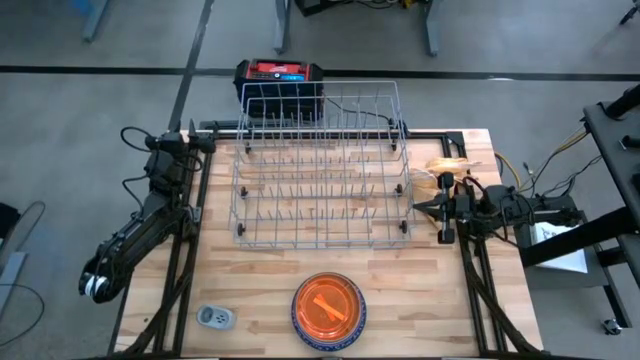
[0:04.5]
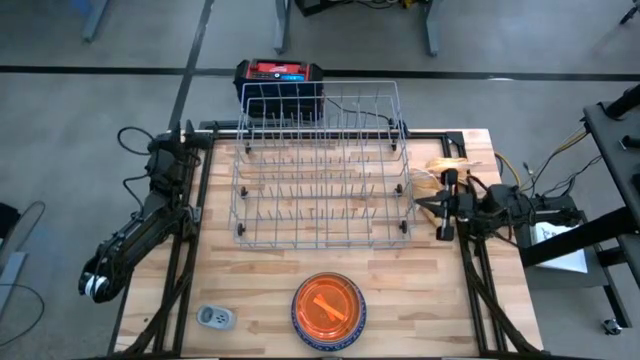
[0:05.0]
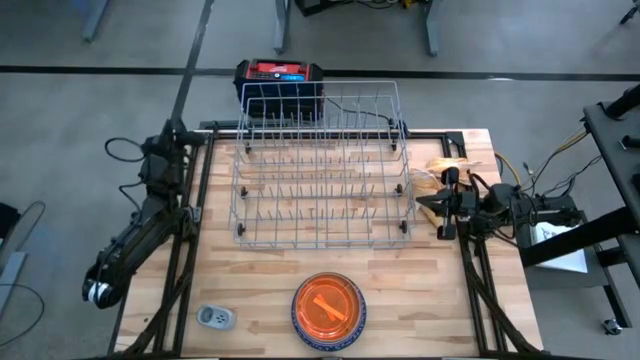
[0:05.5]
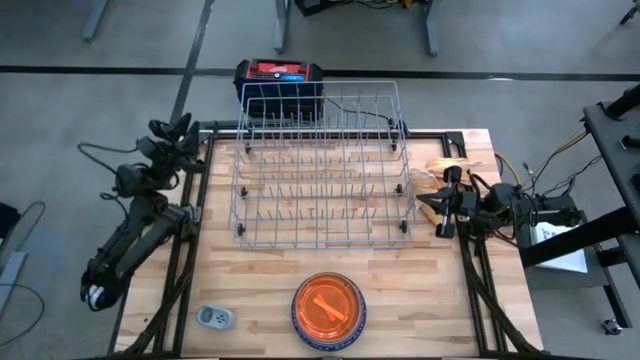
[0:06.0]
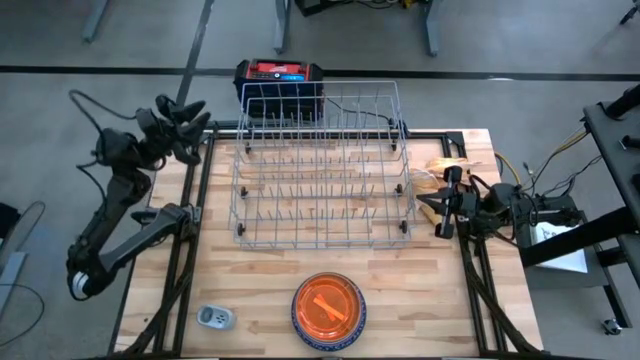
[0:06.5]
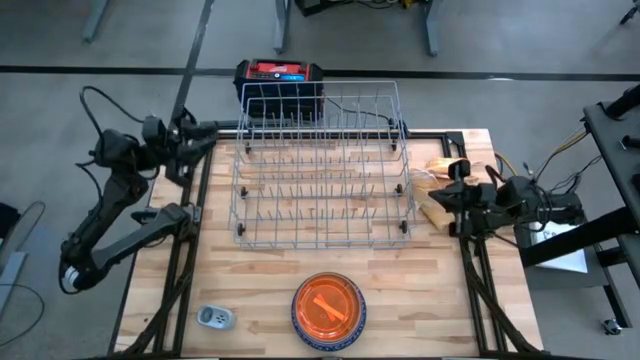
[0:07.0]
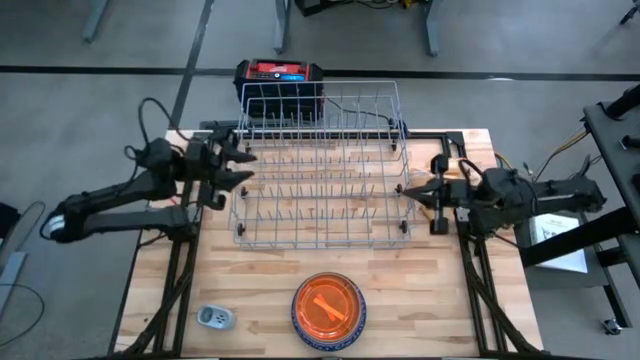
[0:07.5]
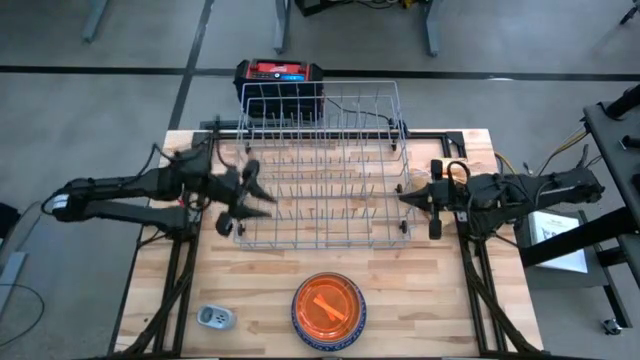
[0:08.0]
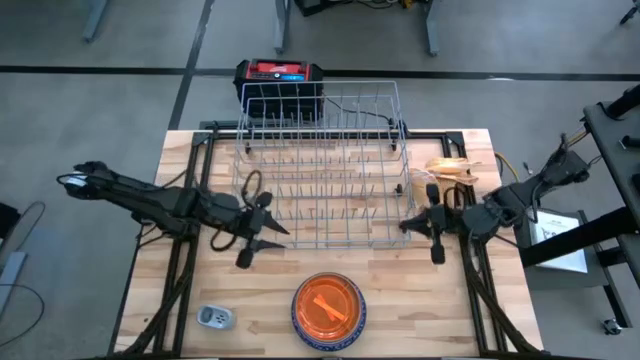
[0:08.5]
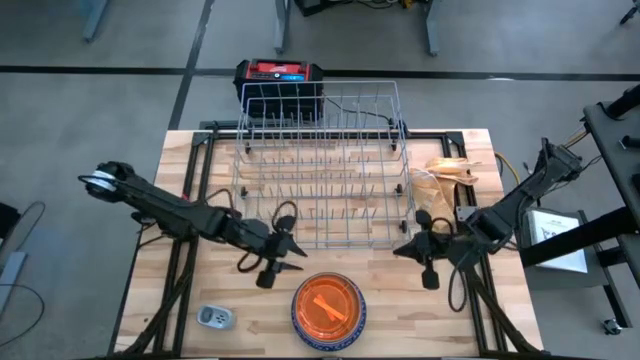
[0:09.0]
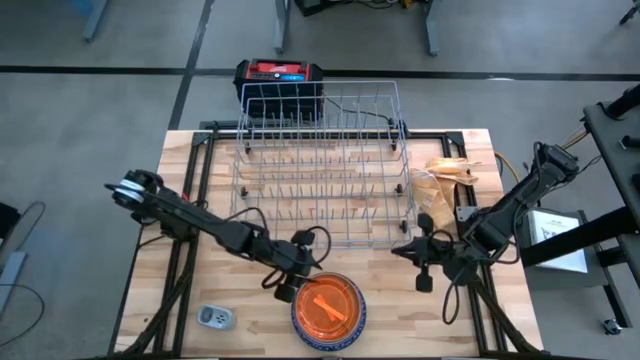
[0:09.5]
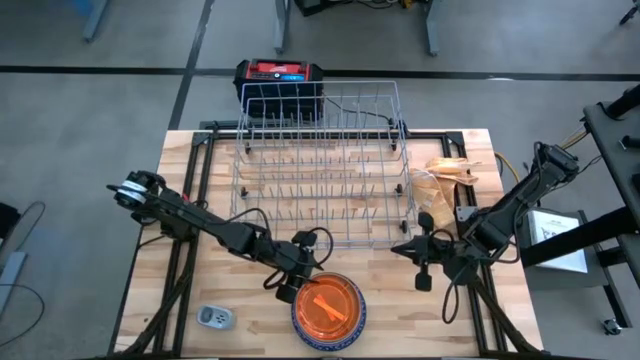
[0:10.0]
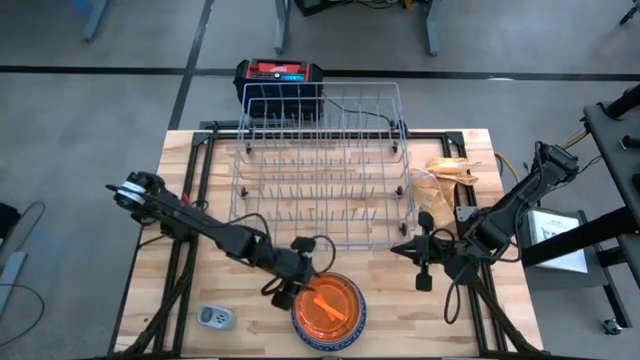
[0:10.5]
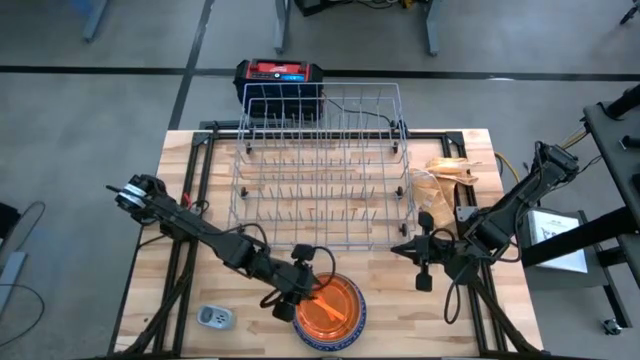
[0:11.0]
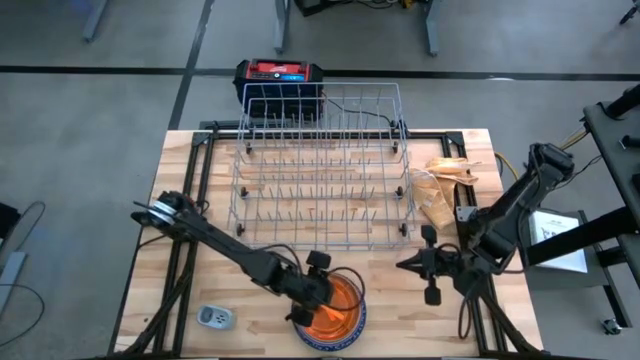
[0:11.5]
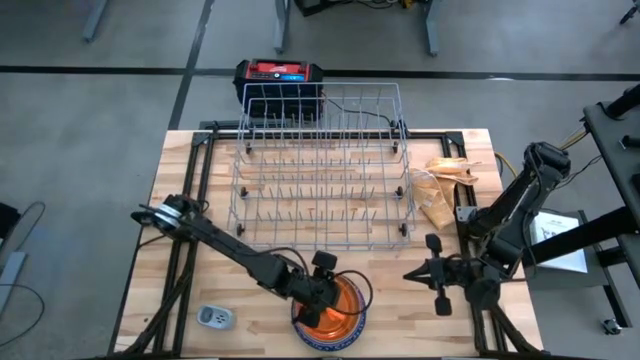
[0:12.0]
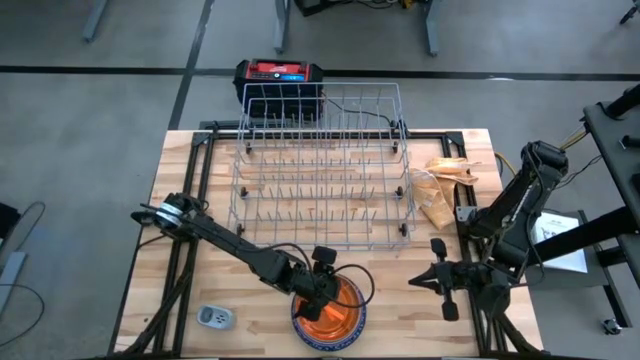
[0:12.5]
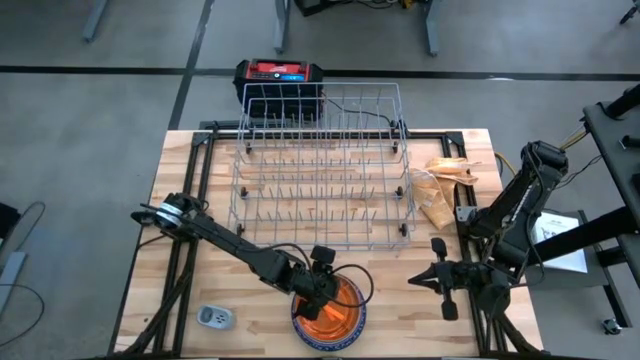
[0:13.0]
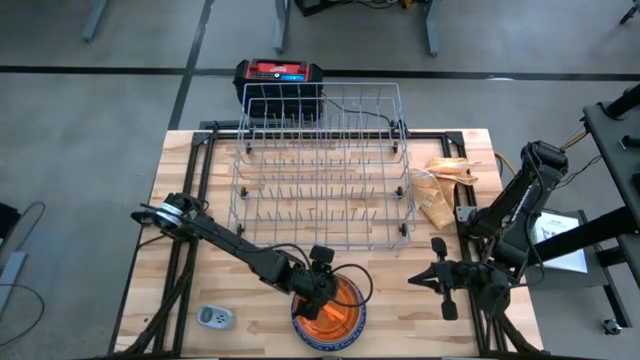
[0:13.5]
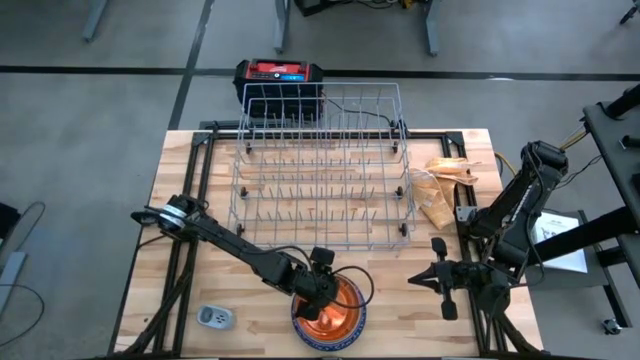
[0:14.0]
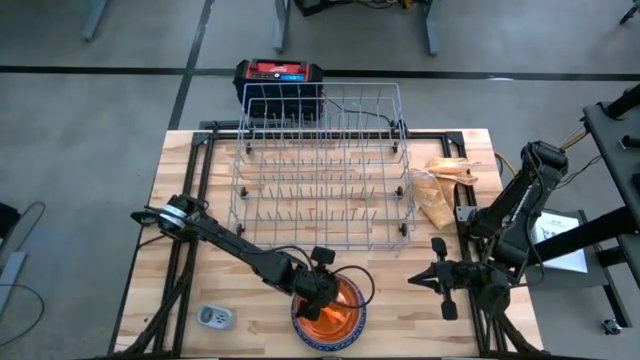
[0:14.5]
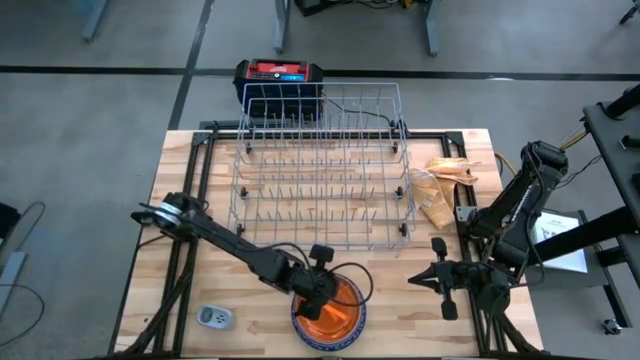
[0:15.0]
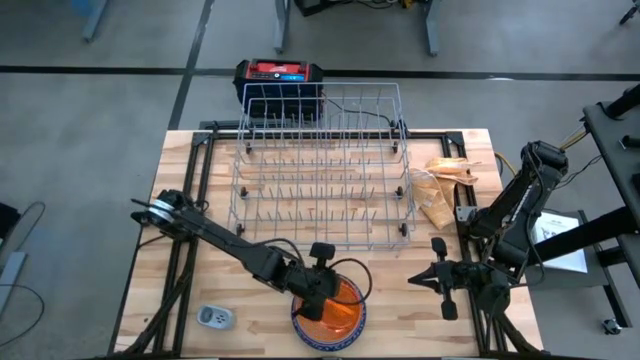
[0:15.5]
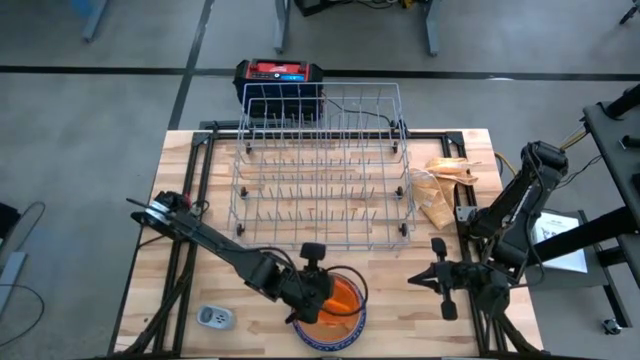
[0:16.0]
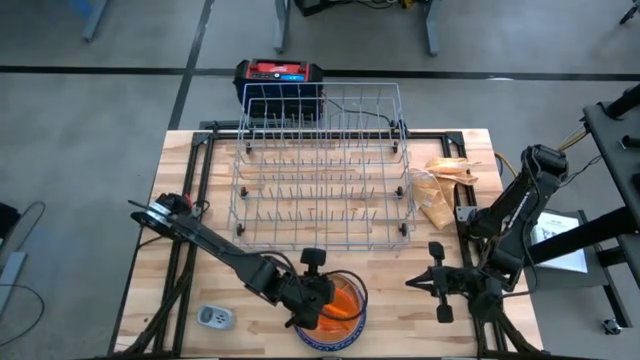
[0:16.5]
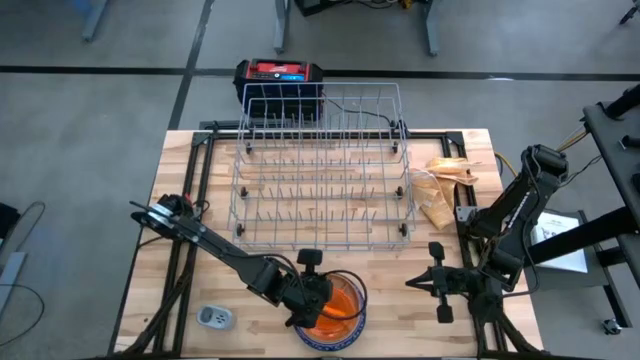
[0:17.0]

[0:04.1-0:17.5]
Task: Sort dishes
Put the orange plate into the dish rack

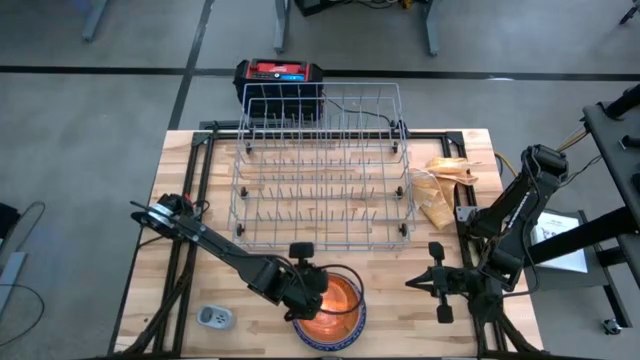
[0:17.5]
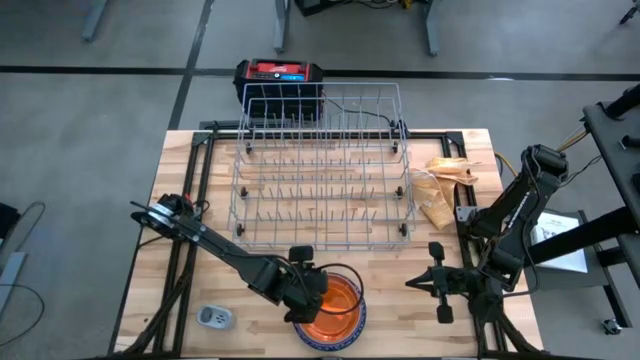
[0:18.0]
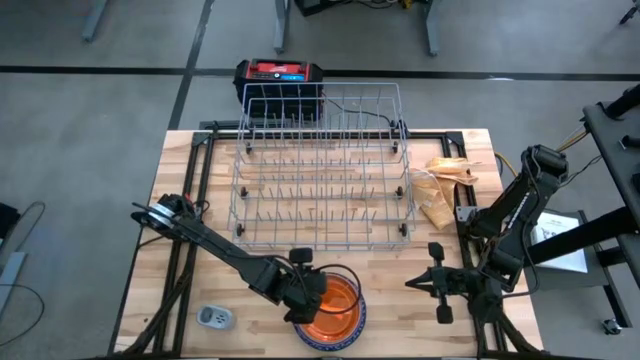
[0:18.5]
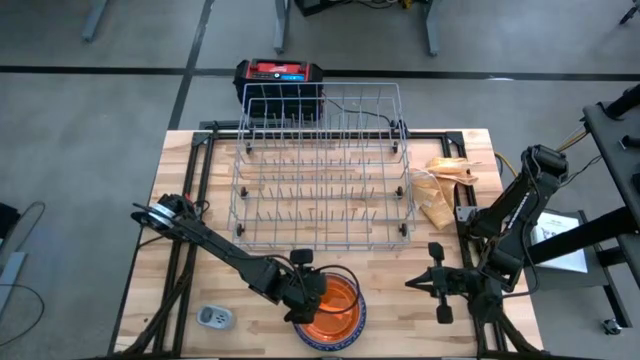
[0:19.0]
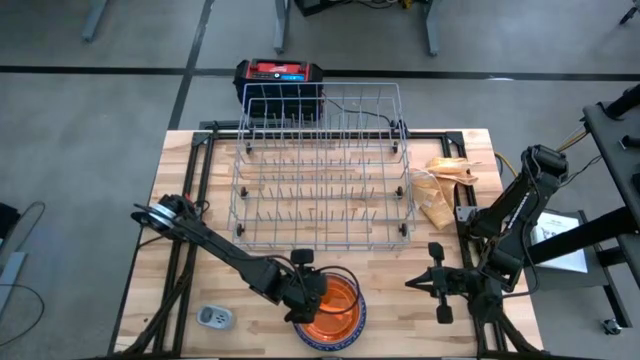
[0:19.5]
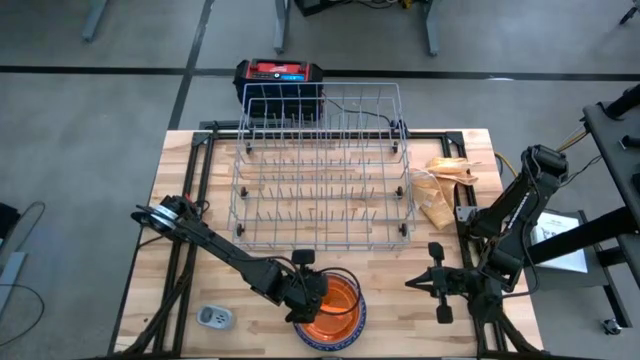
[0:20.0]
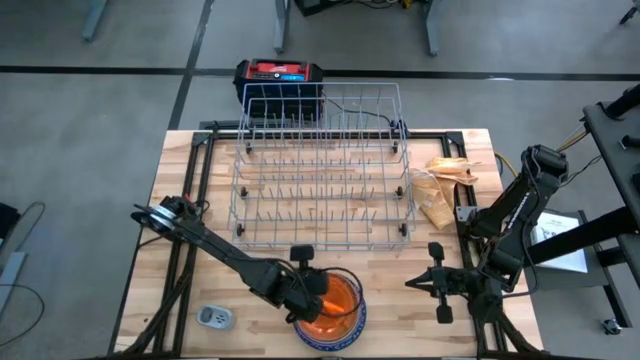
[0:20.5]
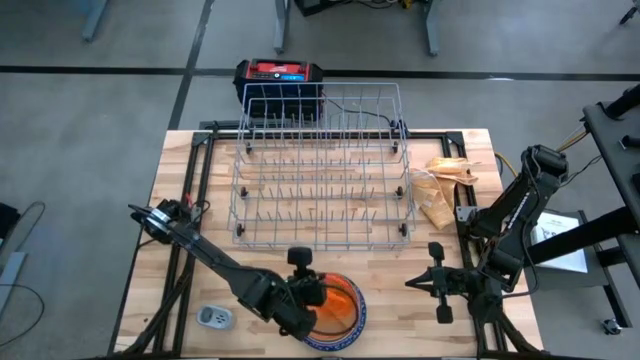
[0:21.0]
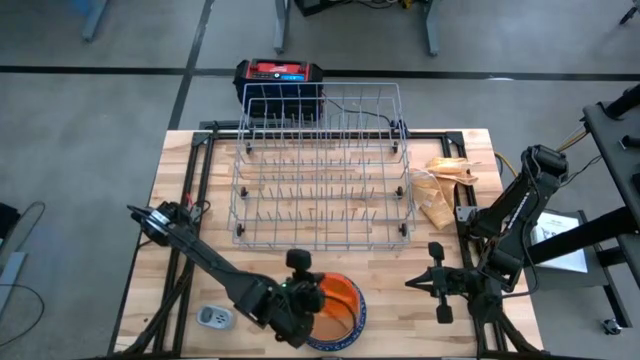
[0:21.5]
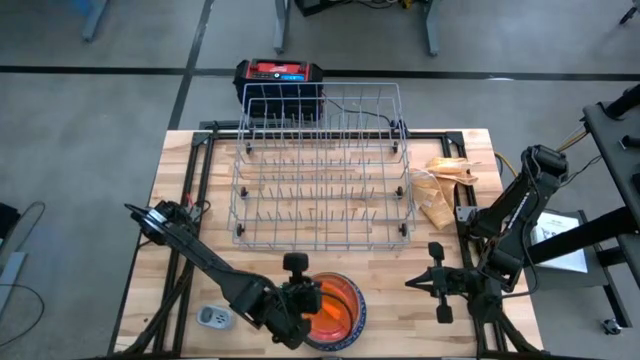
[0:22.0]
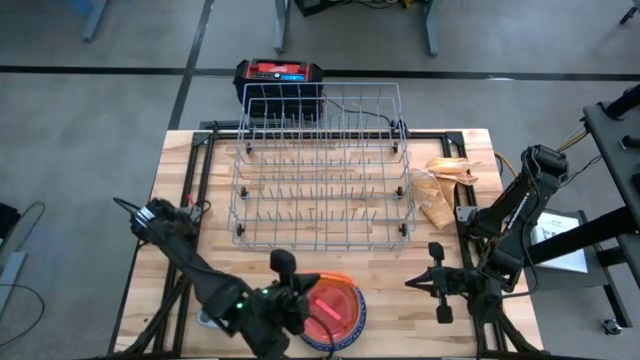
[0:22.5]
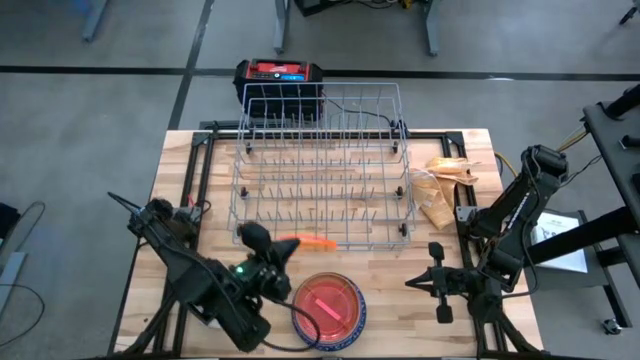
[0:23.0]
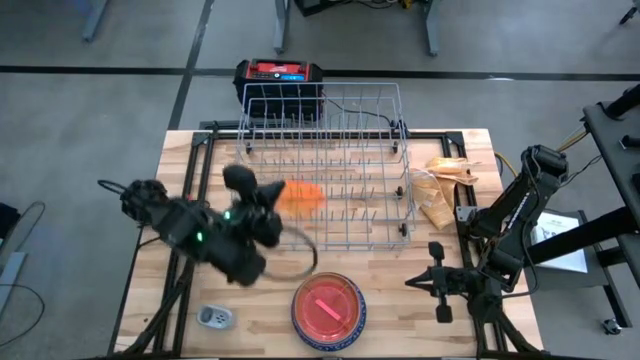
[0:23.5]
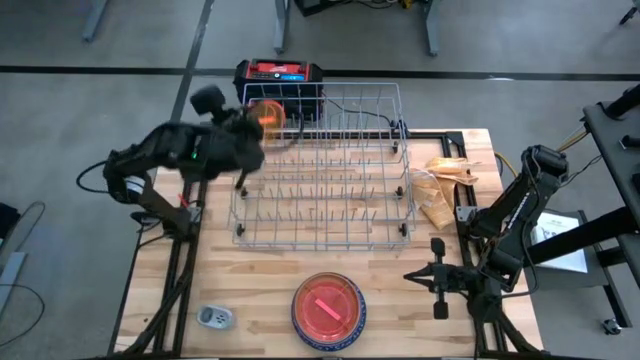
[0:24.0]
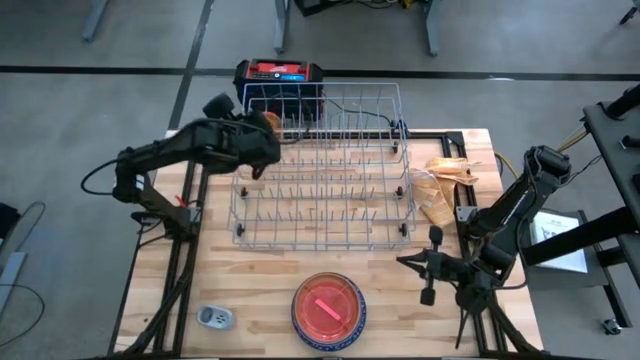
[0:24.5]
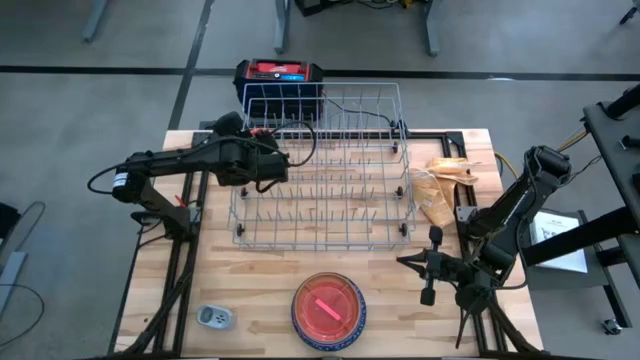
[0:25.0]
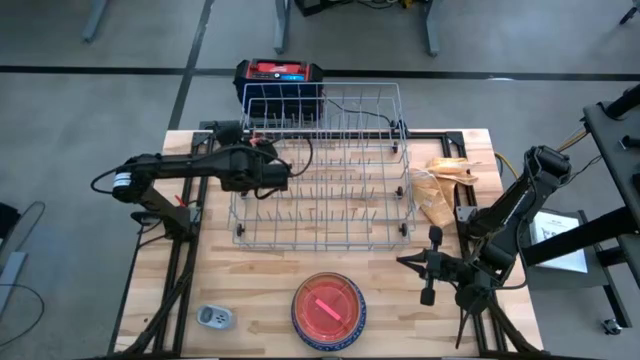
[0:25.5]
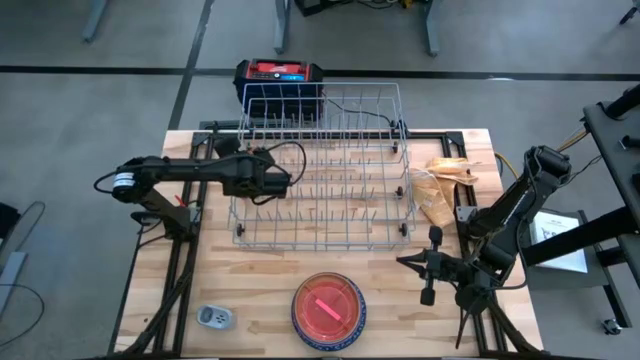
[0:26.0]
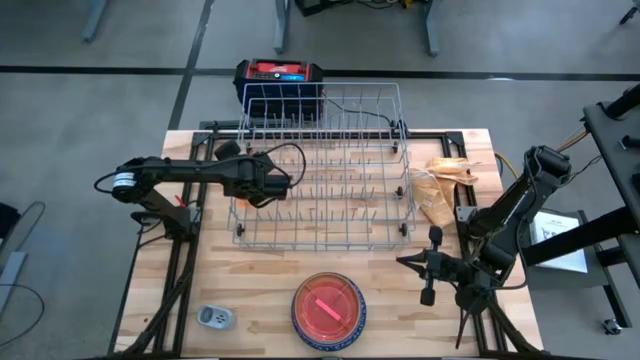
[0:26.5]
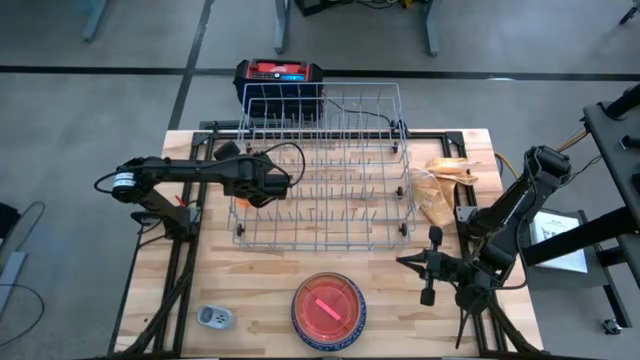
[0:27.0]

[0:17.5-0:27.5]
Put the orange plate into the dish rack
